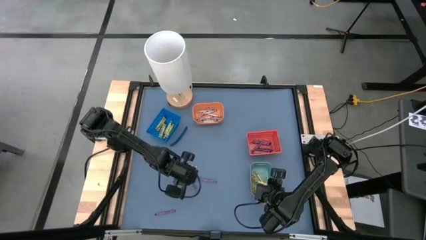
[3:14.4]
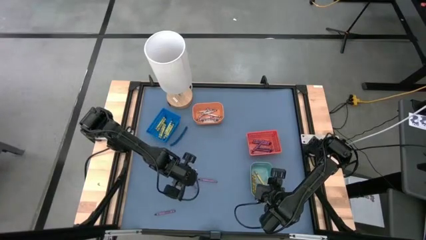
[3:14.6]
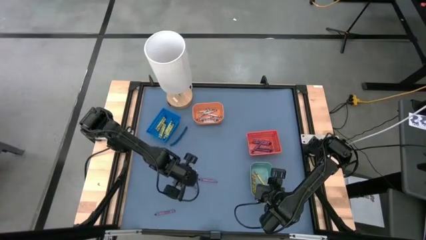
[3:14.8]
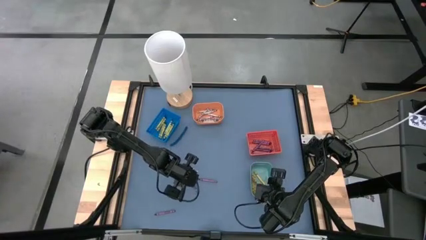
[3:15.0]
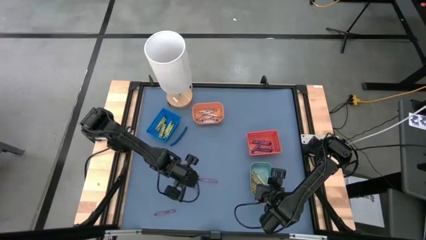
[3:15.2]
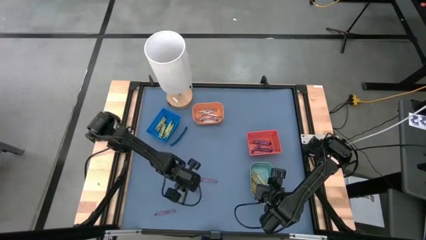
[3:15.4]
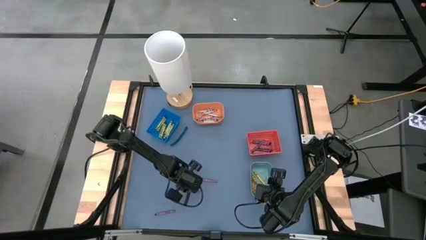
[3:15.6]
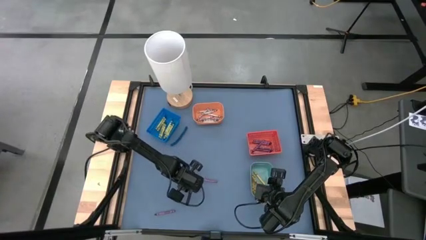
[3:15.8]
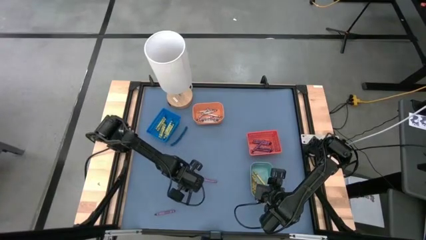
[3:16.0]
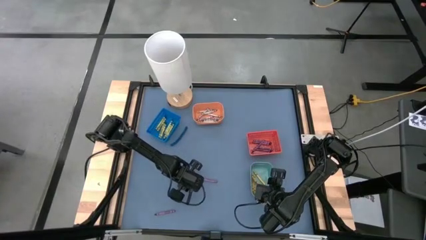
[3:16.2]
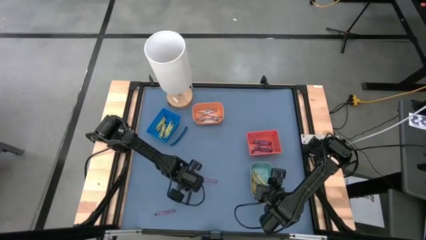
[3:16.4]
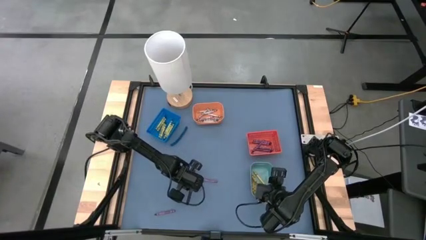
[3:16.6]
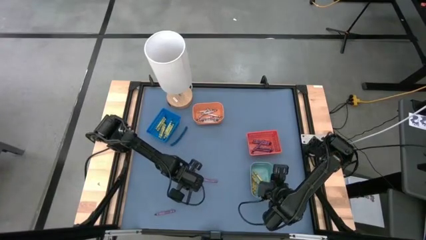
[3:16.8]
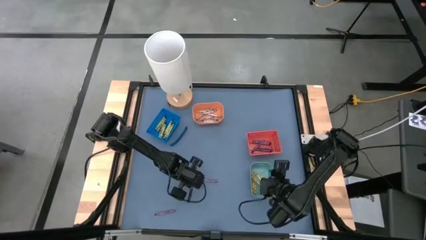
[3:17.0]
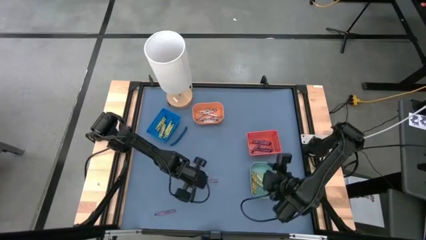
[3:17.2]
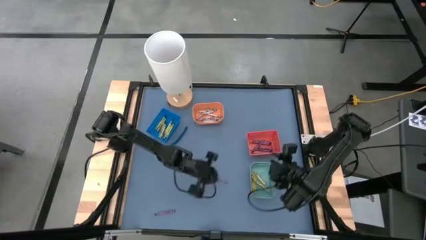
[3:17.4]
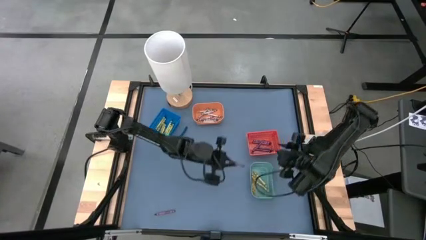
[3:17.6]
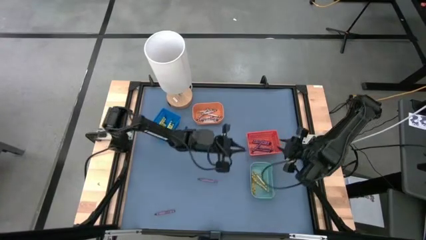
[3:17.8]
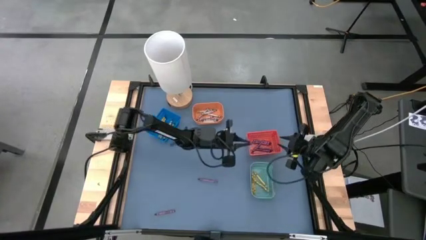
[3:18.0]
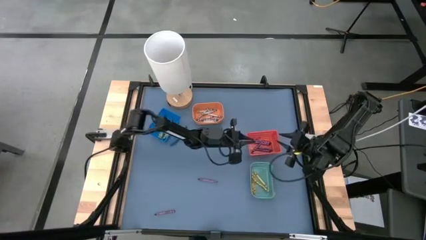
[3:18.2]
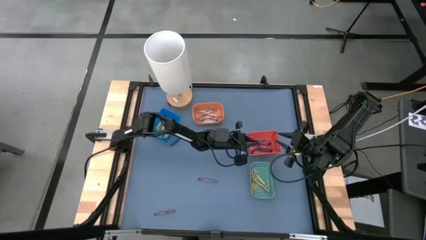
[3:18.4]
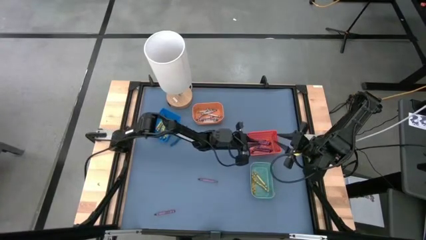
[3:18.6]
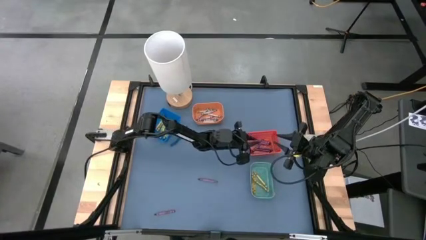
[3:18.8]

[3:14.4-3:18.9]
Task: Sort crayons
Put the violet crayon into the red bin

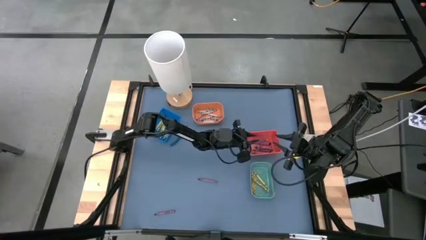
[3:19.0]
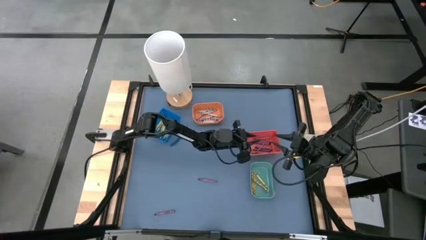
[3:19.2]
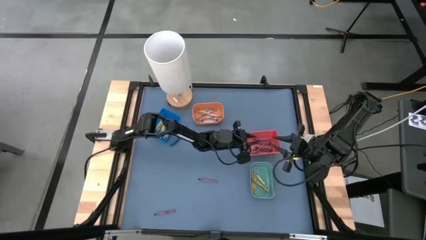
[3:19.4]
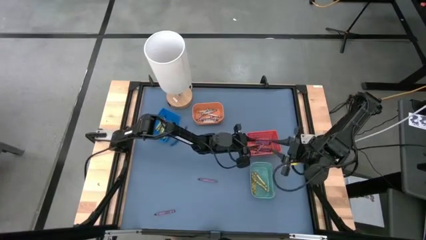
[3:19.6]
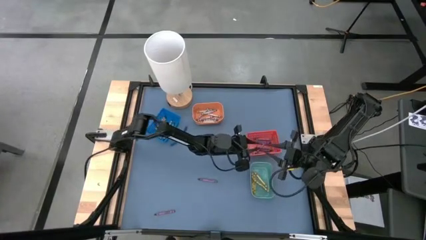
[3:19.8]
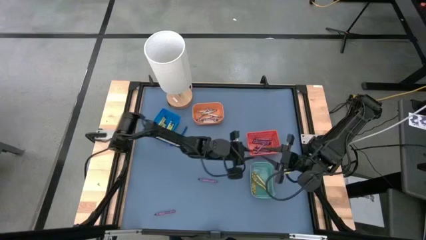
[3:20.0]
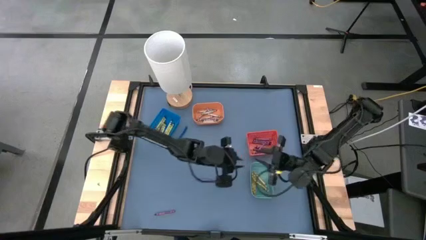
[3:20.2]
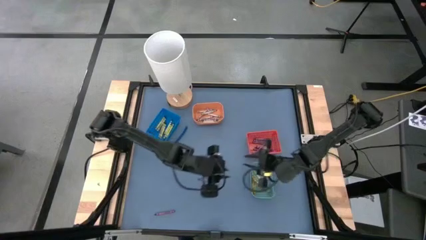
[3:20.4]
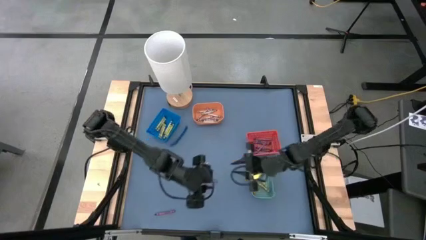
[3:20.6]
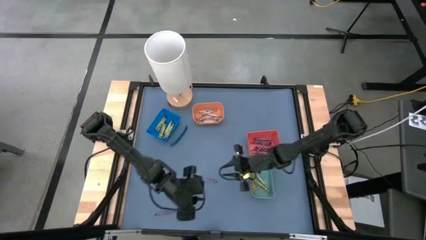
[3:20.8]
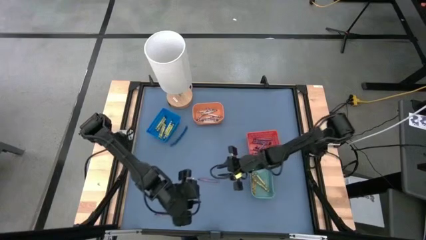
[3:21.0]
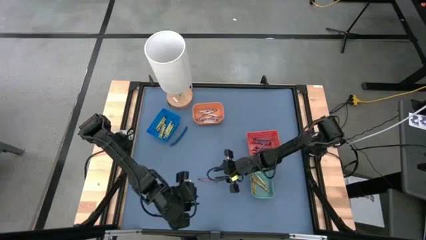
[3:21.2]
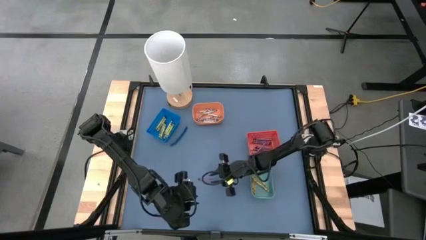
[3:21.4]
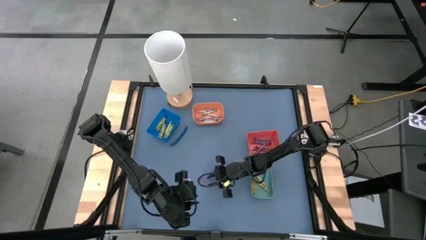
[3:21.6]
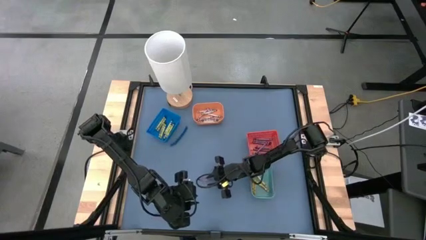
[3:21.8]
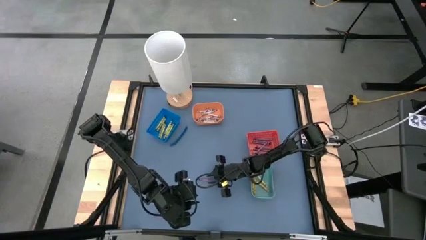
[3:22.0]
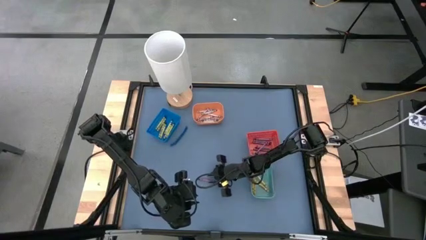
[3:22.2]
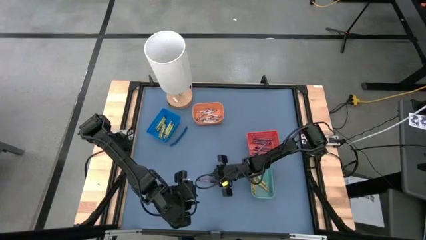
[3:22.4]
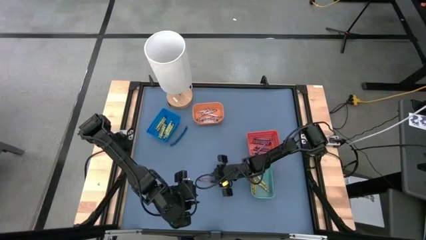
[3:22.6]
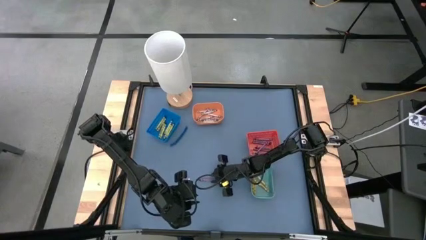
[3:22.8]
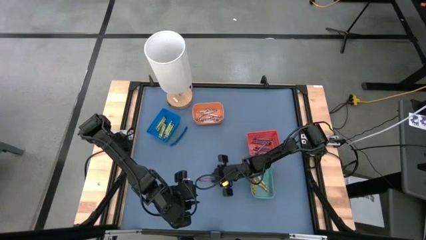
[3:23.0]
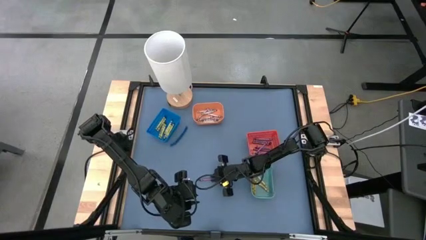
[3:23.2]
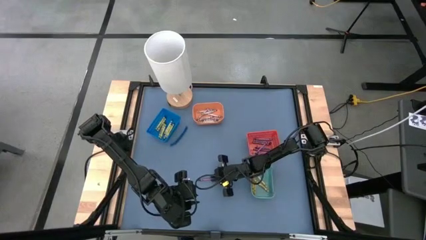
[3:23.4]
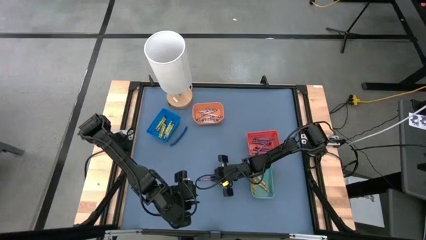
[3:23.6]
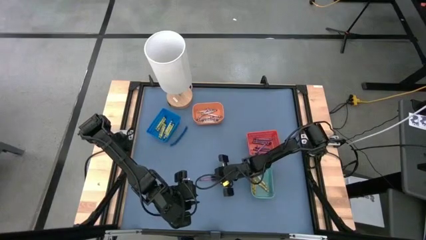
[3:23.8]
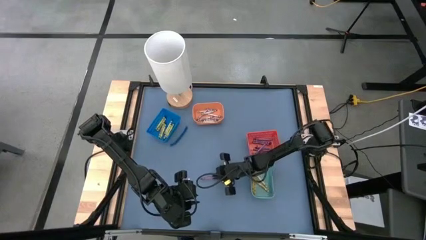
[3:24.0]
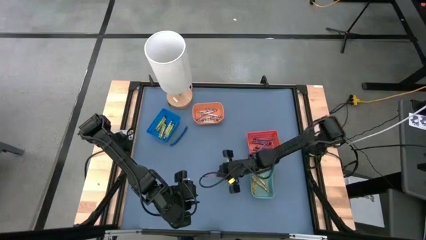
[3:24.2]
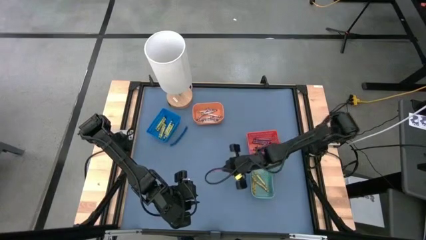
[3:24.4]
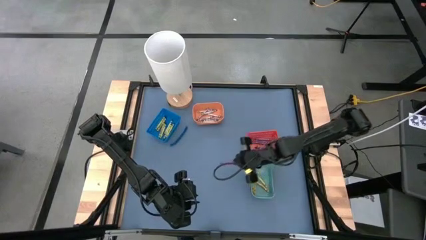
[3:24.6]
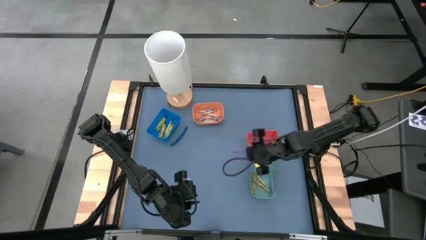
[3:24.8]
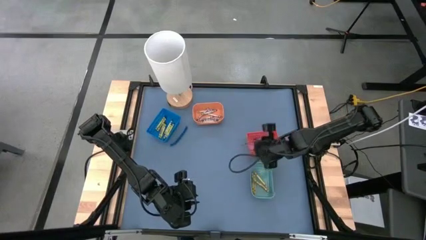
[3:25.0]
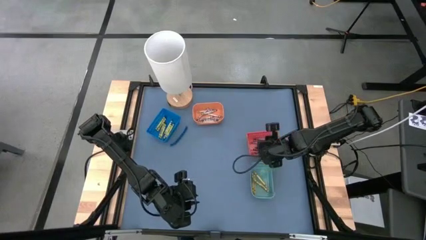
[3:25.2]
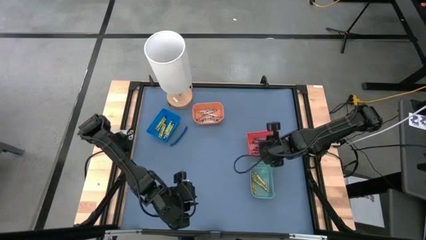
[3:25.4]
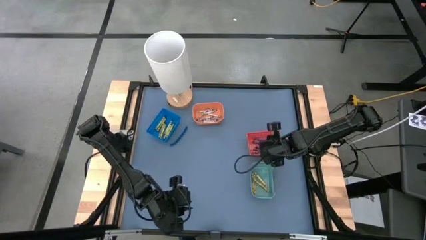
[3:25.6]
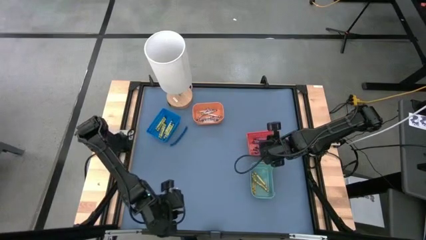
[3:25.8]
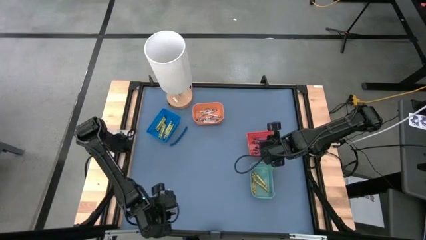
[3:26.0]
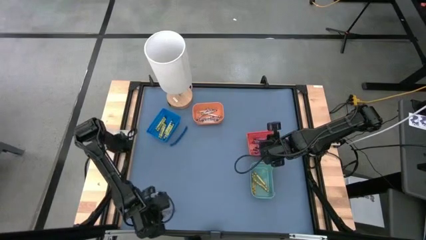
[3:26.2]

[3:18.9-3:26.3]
Put the violet crayon into the red bin

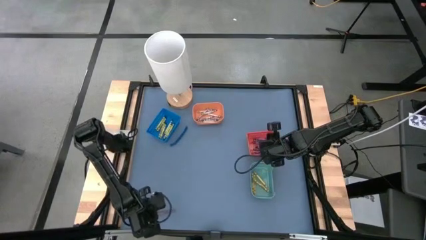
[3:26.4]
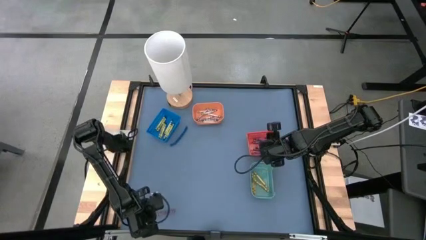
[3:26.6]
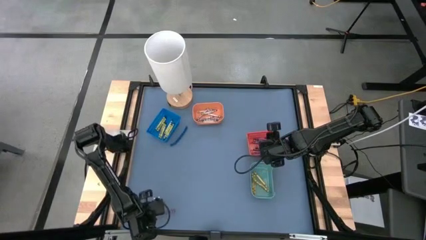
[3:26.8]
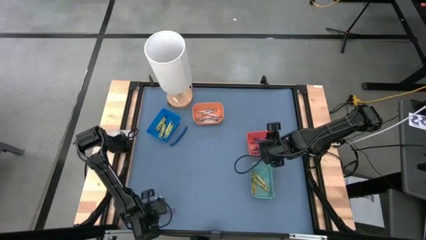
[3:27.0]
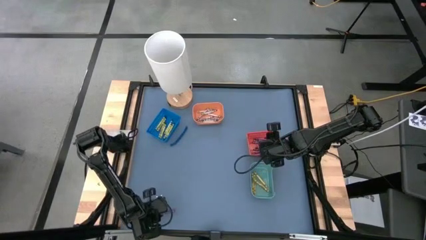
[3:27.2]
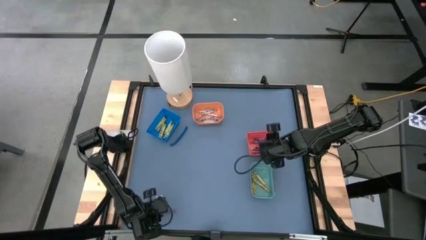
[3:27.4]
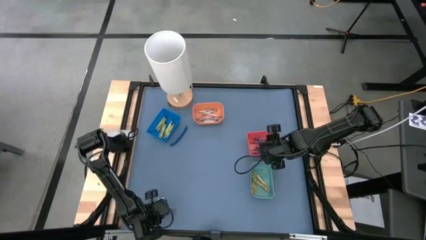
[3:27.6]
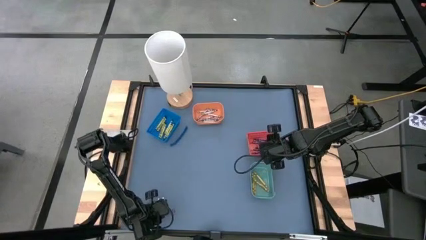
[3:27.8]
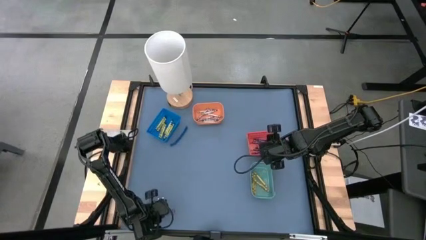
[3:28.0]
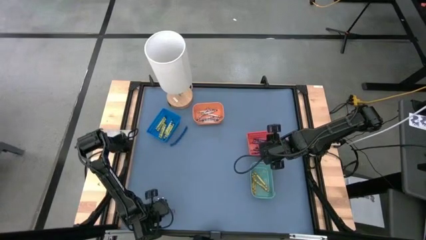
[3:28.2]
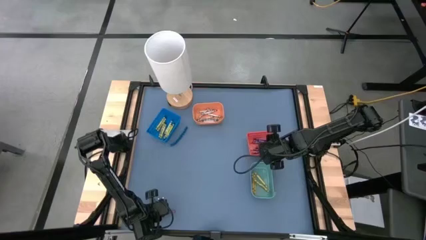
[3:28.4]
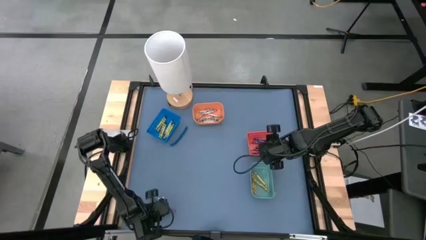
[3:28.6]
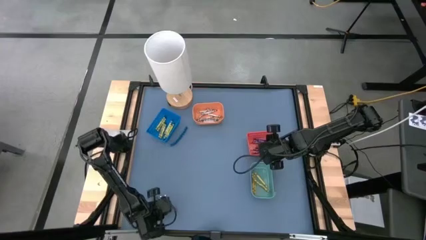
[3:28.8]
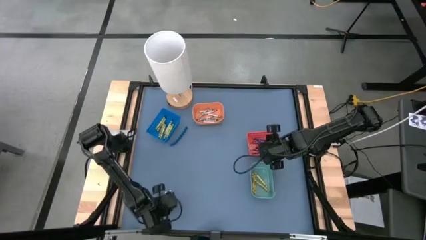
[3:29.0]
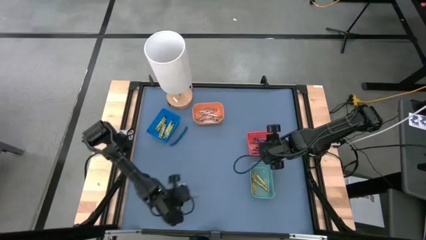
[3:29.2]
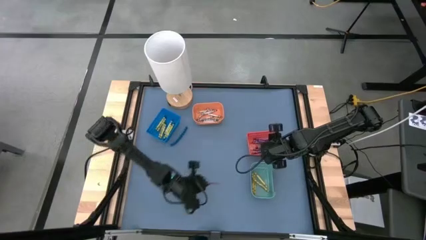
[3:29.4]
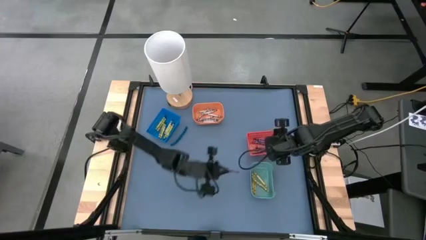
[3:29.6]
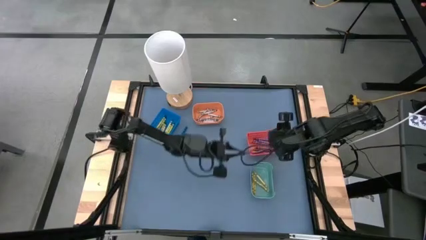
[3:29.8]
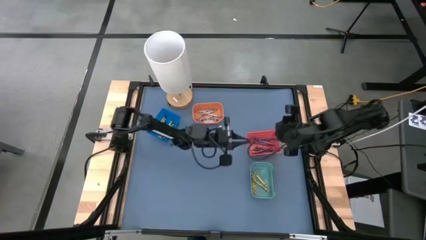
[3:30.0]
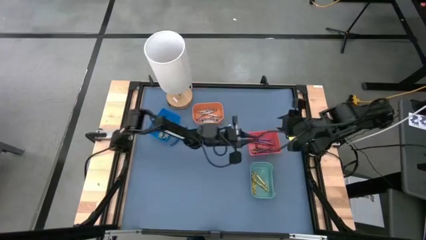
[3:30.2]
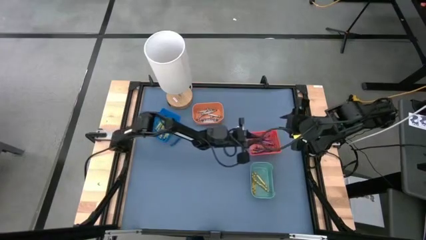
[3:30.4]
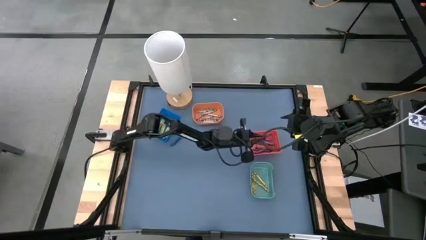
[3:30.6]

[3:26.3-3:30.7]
Put the violet crayon into the red bin
